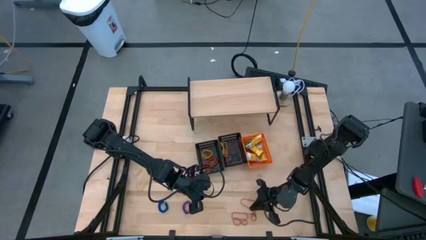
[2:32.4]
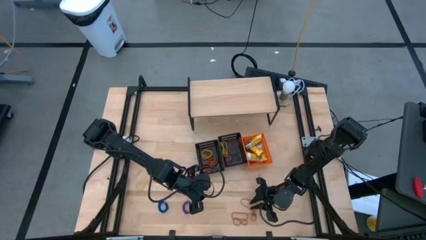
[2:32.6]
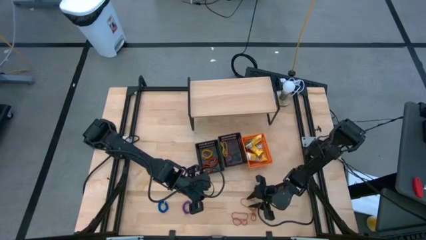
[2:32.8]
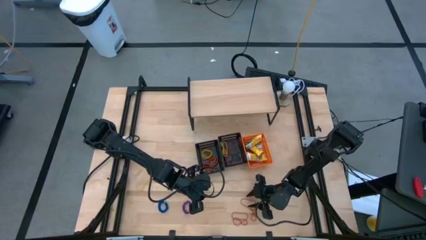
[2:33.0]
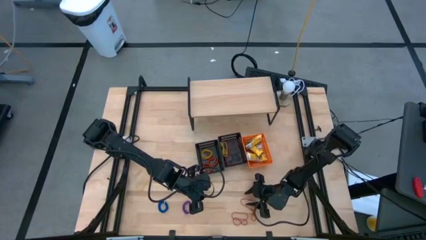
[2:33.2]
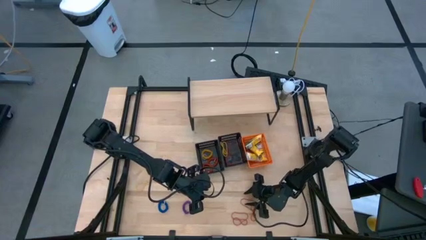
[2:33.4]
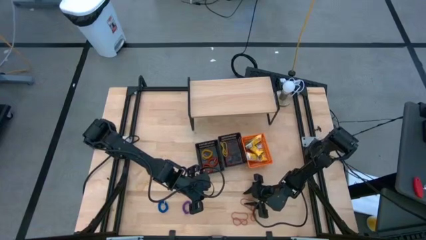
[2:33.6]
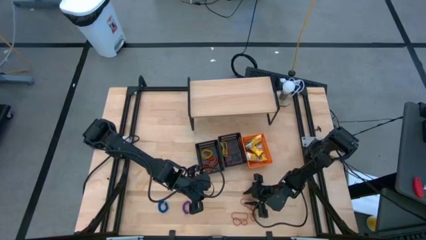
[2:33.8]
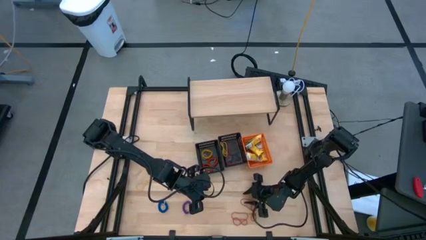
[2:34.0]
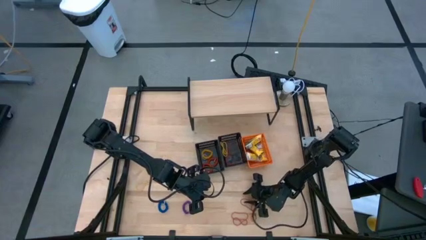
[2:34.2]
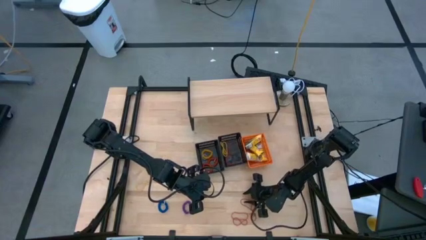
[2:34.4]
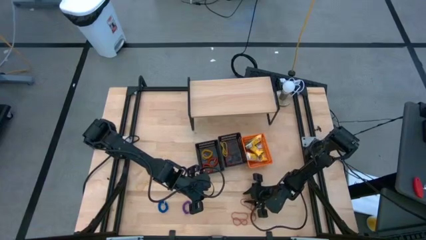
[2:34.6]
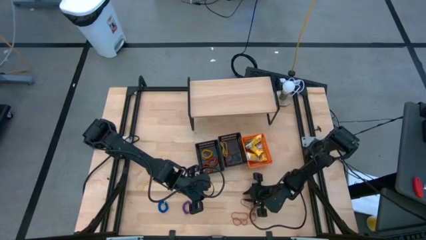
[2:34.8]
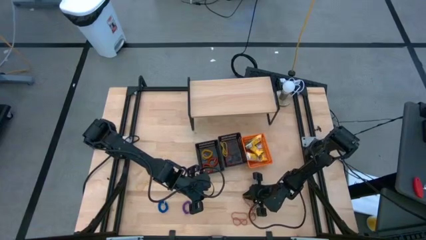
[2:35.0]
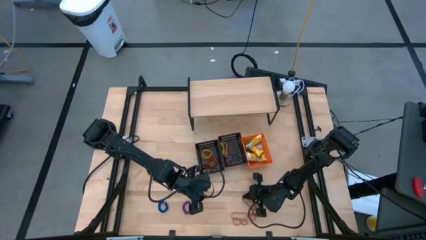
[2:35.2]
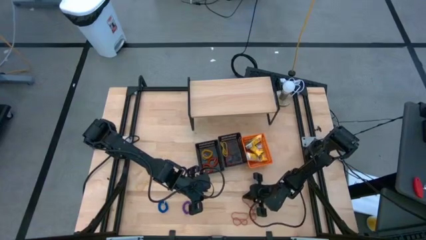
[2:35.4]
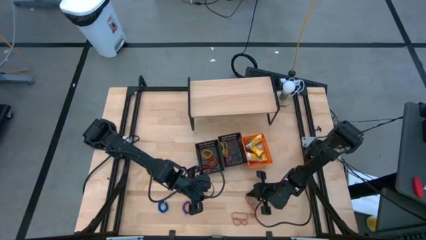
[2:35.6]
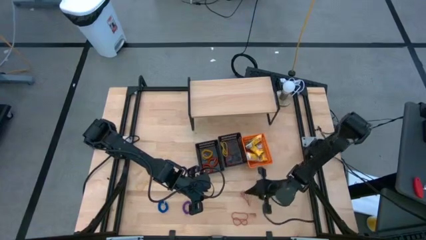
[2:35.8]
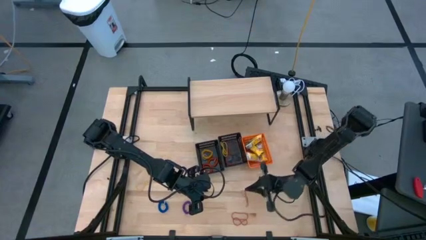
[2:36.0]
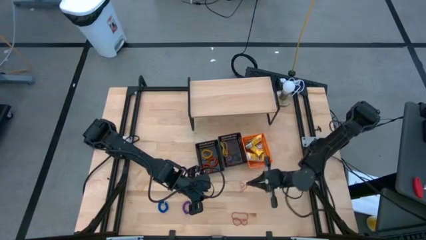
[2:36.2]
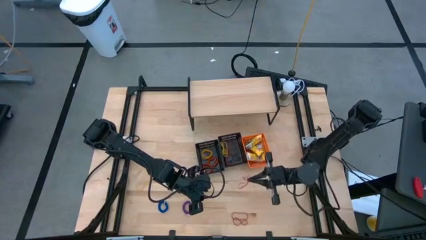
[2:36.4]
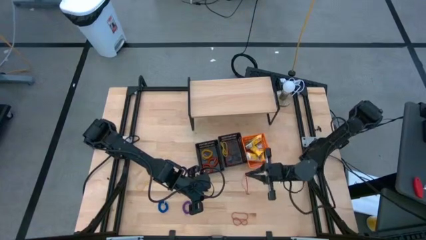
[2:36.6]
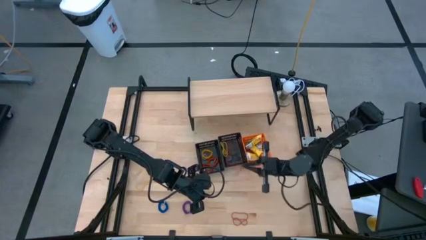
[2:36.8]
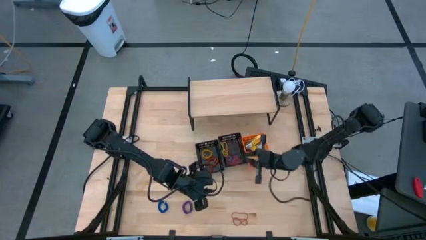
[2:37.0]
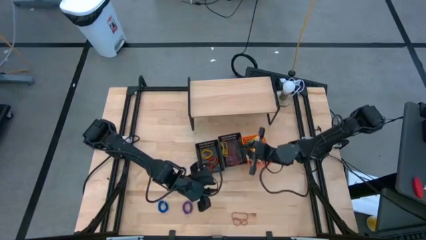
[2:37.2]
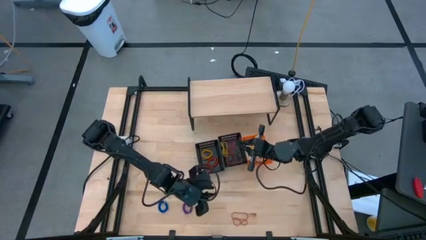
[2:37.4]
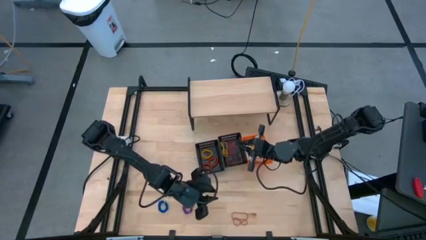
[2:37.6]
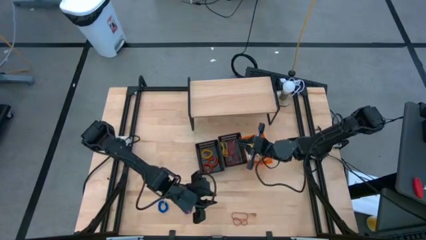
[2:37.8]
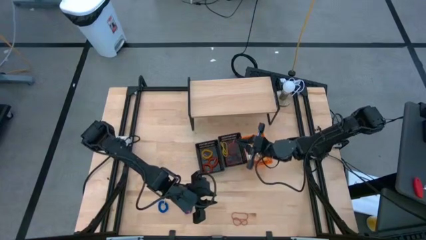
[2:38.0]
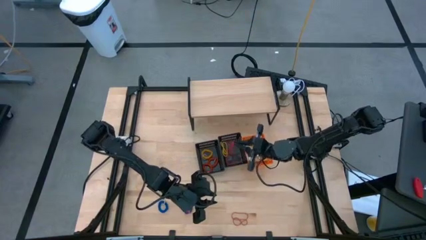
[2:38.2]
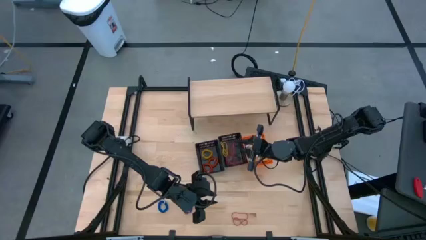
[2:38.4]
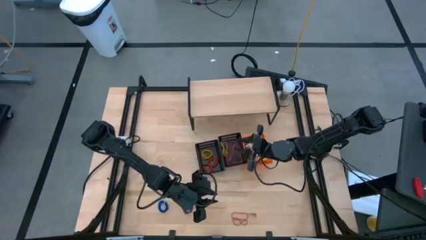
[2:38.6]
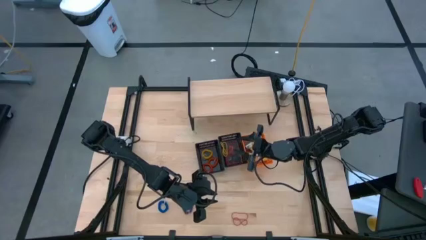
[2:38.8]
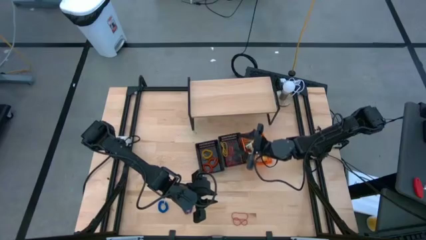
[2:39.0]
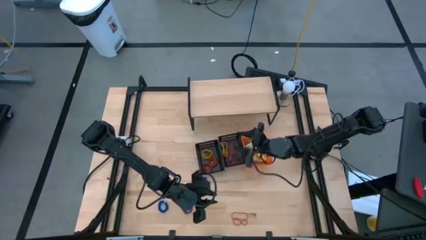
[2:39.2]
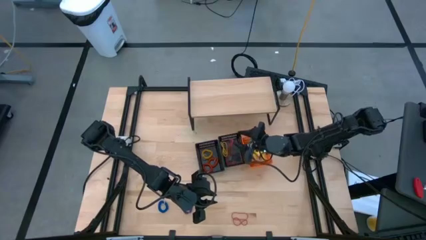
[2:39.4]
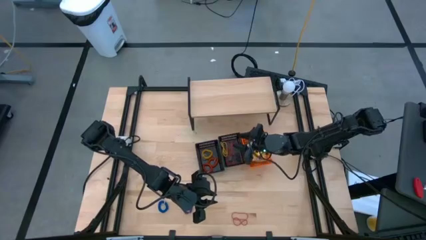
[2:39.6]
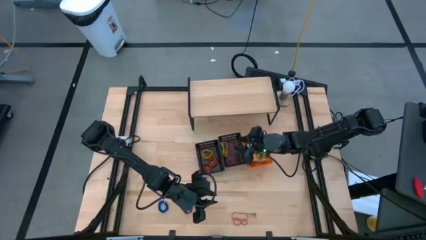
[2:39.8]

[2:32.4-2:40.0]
Task: Pick & Place Office Desk Supplies
Put the orange rubber band into the right black bin

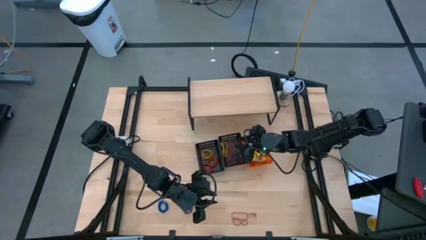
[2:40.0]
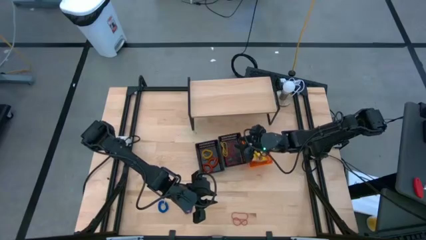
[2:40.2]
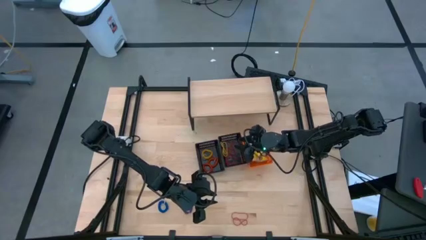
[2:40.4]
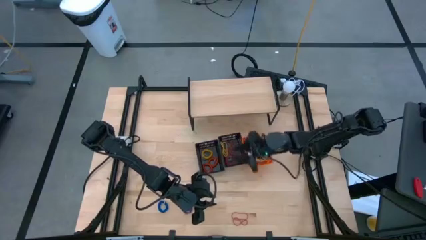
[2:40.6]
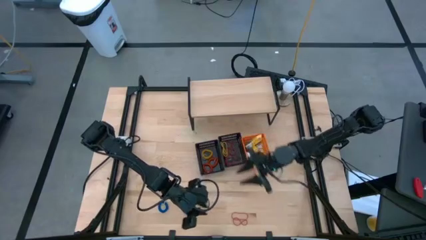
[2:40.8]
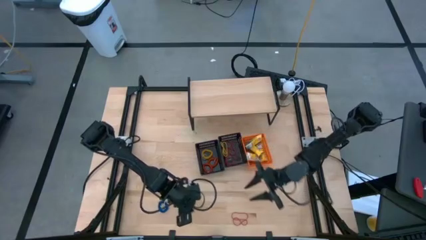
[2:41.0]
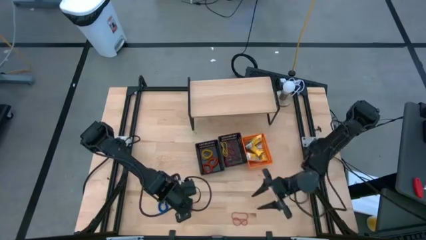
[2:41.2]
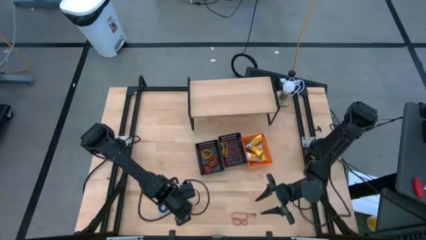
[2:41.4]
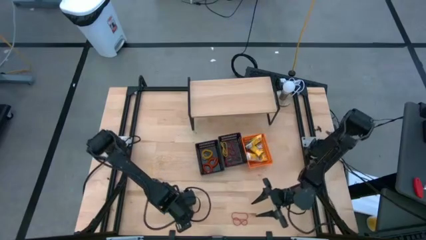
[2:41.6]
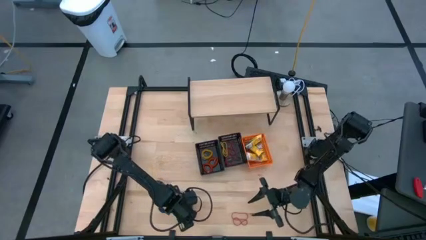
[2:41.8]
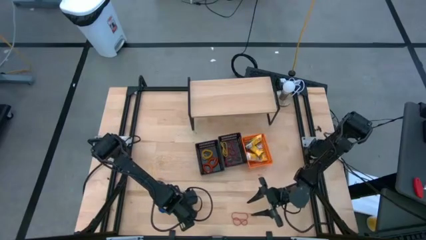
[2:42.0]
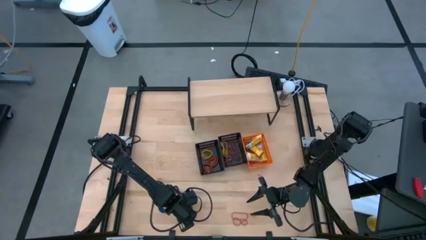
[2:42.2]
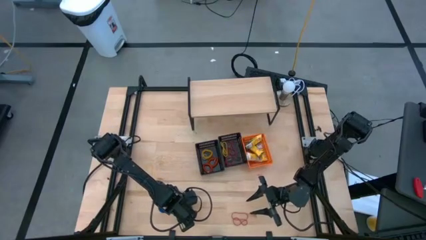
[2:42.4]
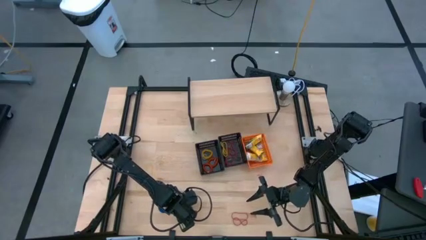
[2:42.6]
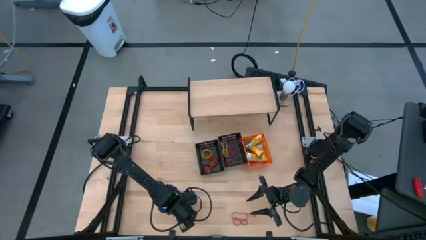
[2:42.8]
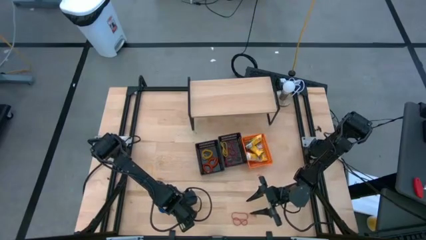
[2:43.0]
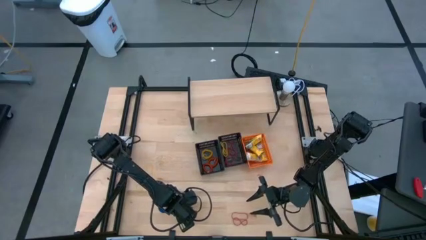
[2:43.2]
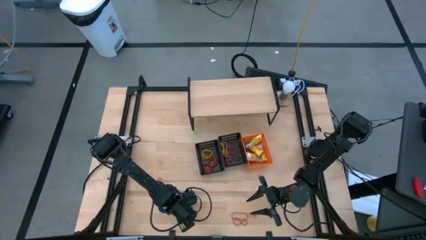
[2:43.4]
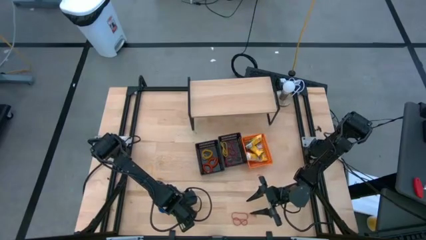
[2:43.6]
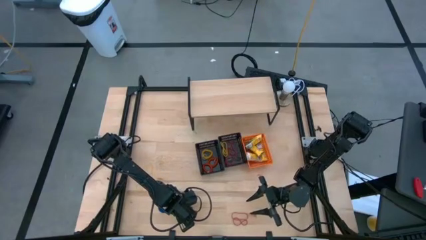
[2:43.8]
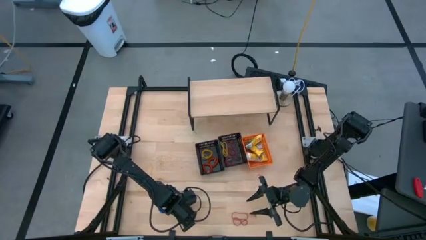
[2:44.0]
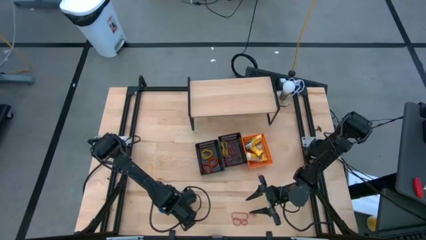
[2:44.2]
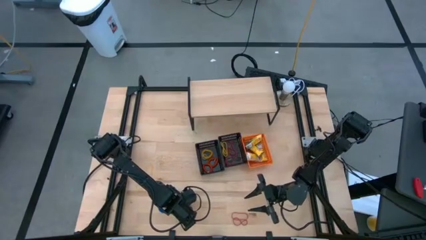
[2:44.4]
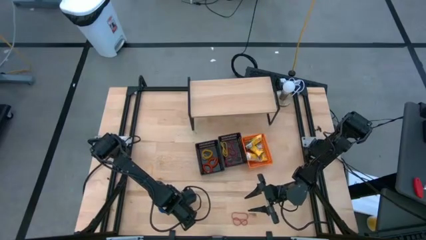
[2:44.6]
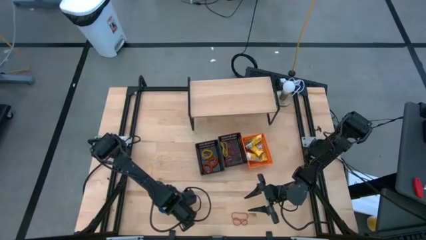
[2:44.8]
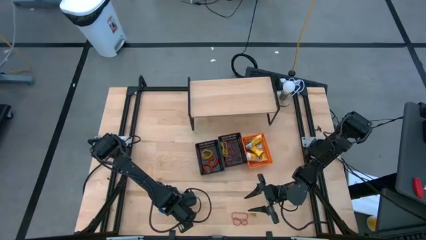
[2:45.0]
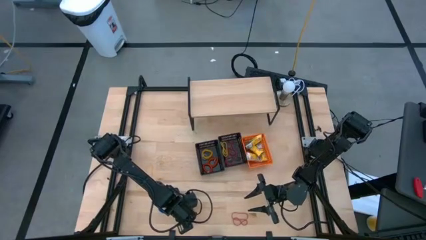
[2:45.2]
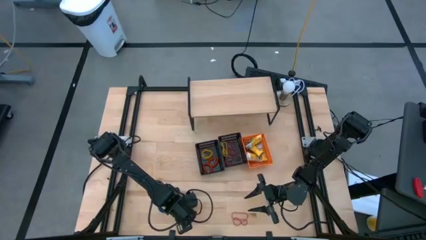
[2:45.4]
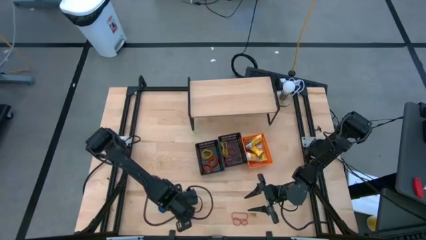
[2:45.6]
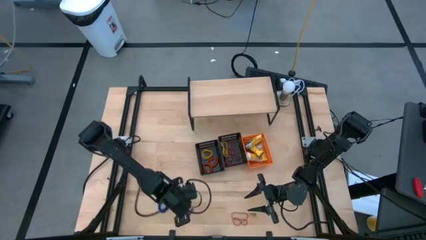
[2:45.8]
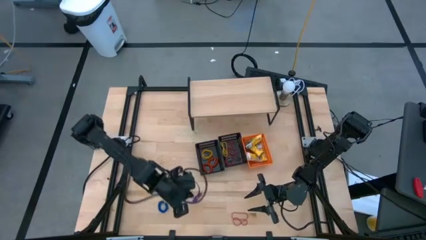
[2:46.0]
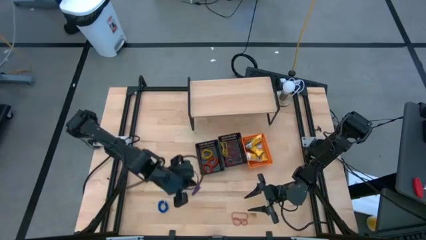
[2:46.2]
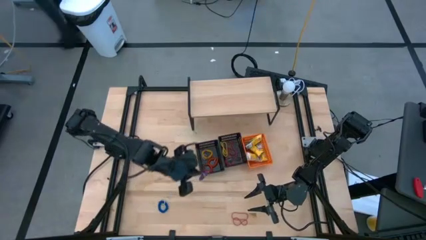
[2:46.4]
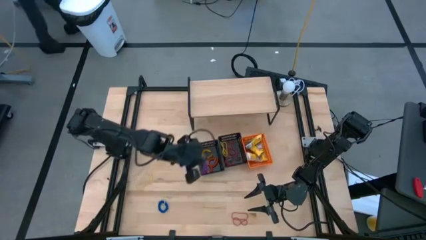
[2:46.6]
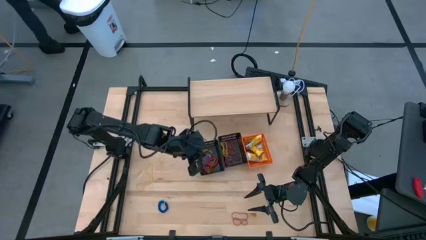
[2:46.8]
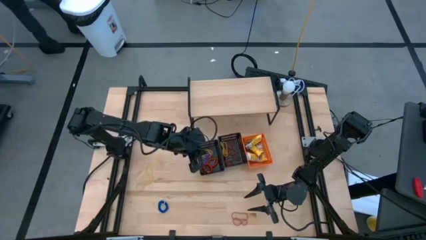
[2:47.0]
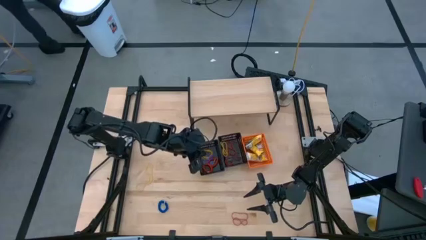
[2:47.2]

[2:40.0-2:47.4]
Put the purple spiral keychain tie into the left black bin

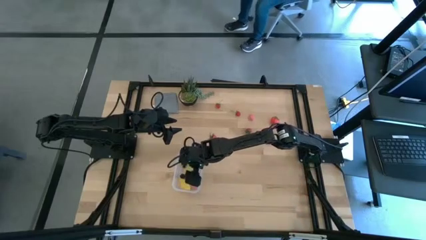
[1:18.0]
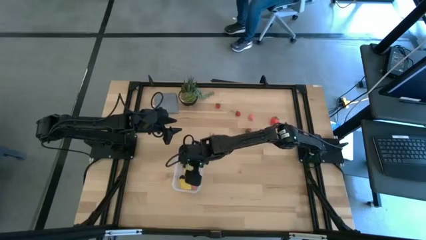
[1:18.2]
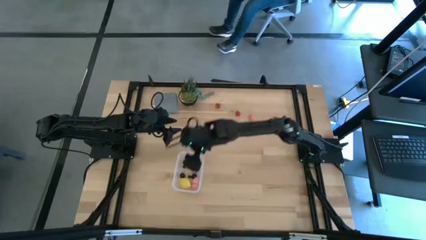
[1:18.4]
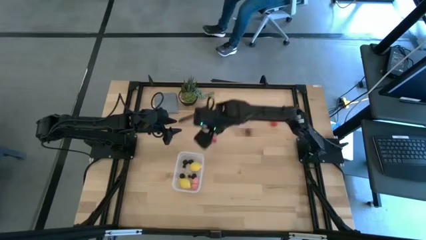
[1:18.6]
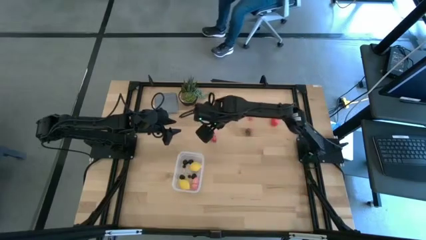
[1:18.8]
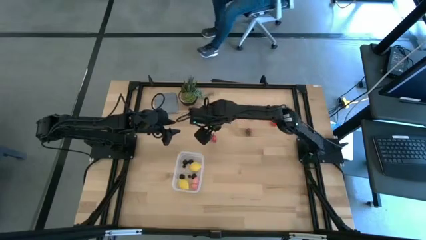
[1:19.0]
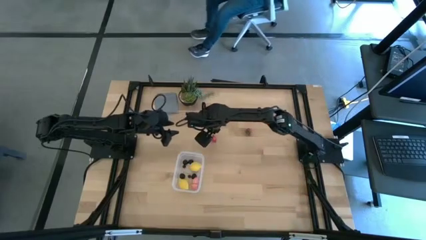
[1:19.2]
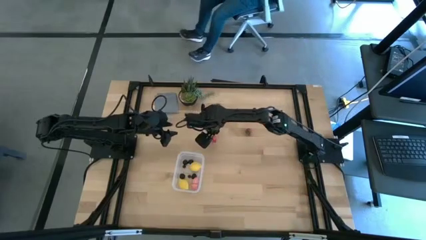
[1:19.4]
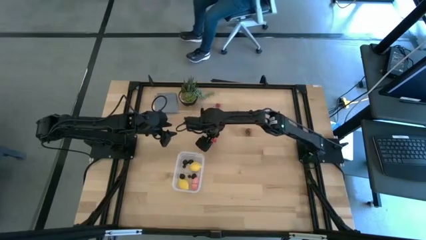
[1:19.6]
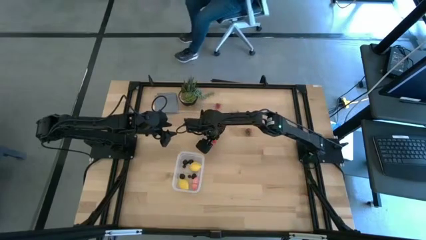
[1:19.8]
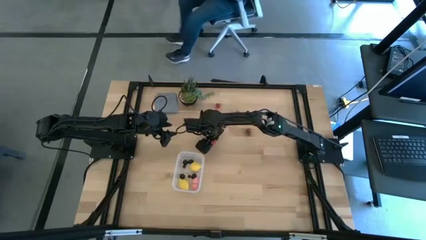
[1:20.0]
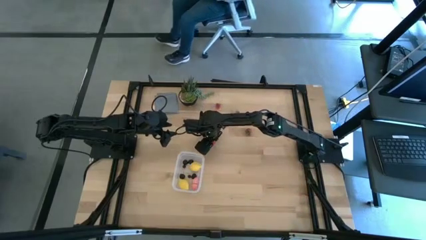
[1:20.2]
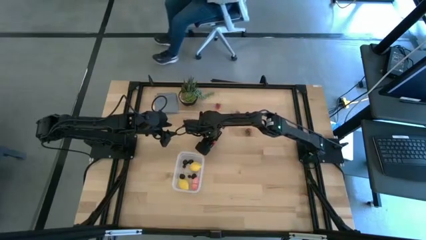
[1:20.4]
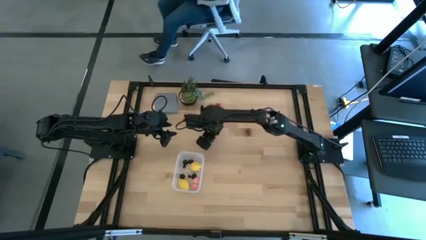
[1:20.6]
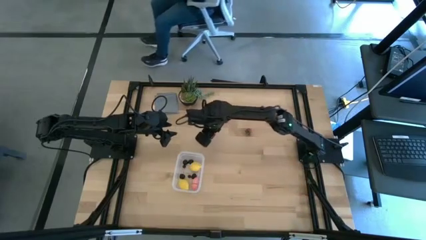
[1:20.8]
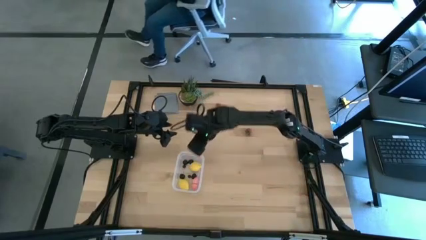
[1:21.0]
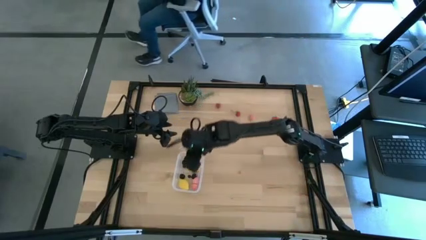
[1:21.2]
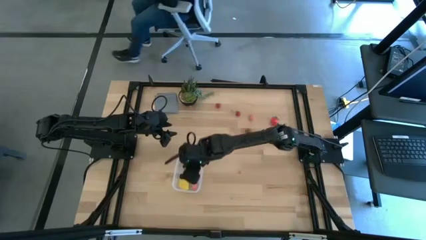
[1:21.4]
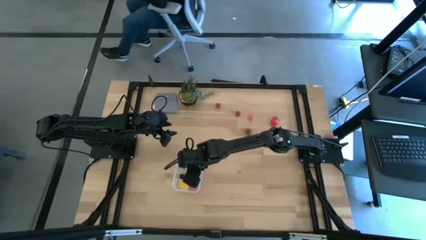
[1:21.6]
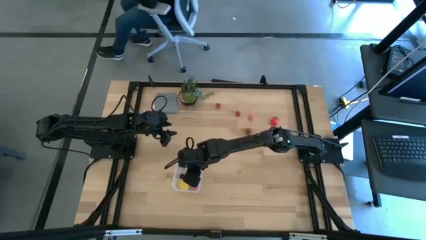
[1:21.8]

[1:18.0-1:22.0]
Task: Pick and placing Produce into tupperware
Put the red strawberry into the transparent bin
